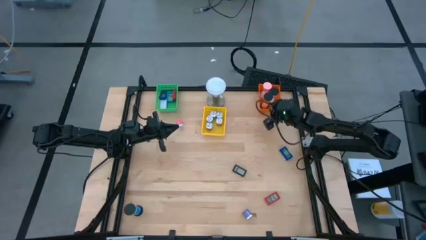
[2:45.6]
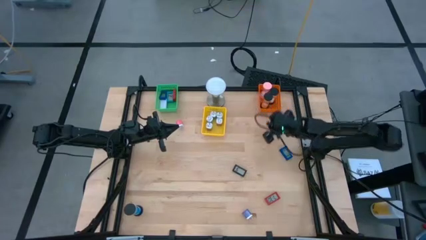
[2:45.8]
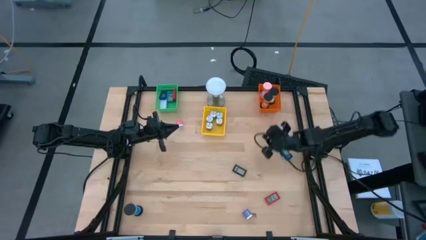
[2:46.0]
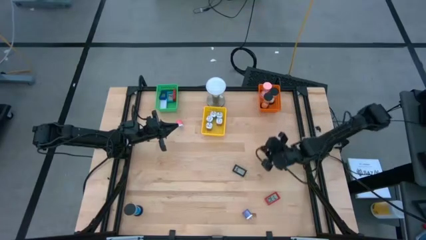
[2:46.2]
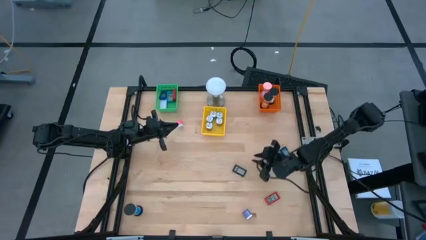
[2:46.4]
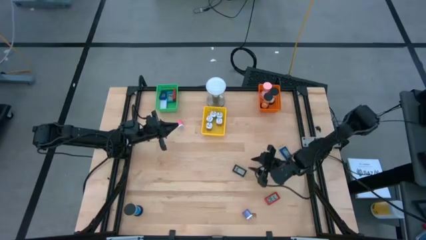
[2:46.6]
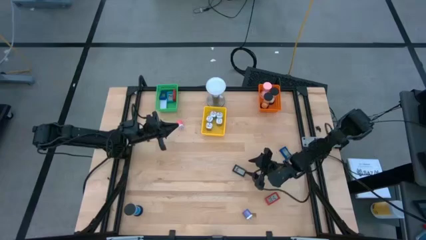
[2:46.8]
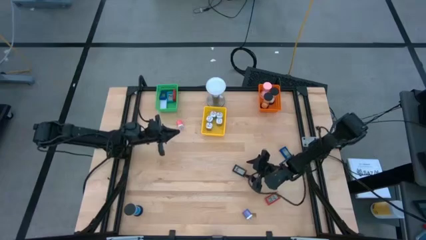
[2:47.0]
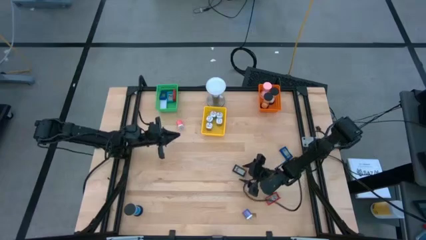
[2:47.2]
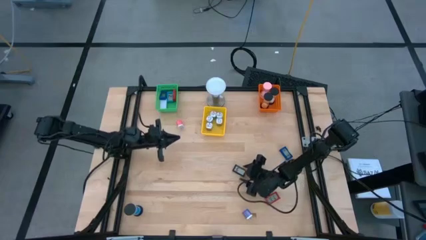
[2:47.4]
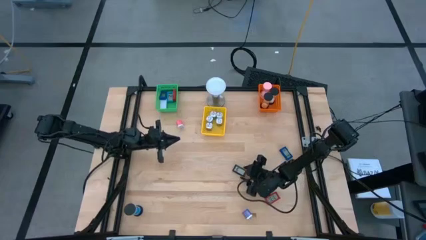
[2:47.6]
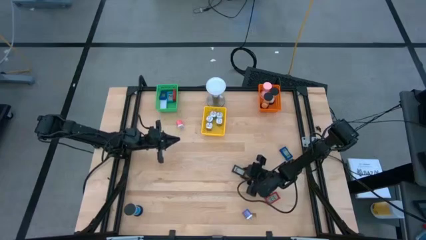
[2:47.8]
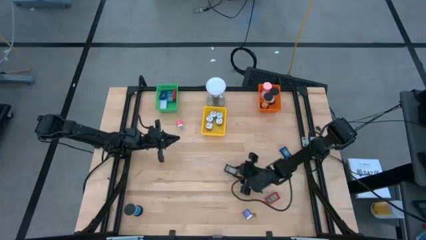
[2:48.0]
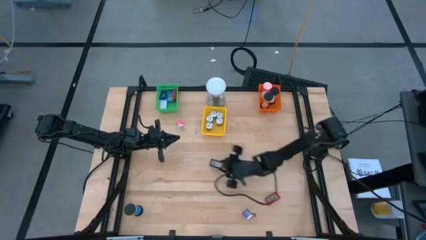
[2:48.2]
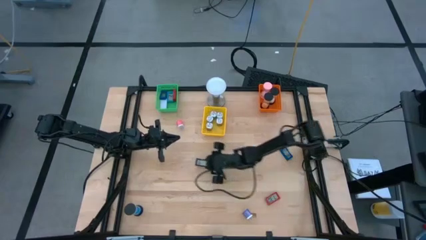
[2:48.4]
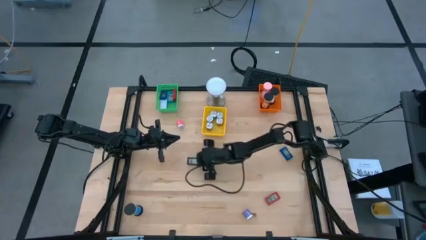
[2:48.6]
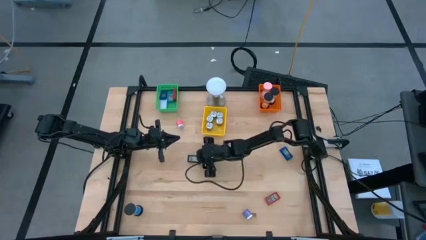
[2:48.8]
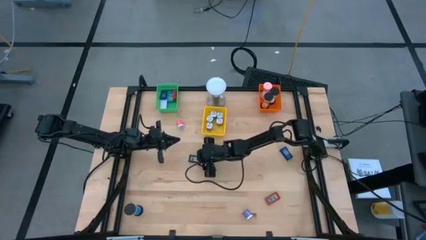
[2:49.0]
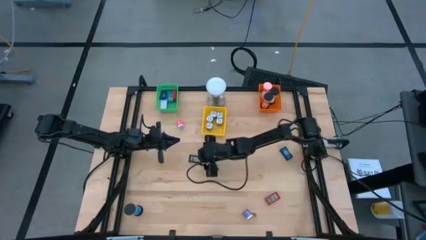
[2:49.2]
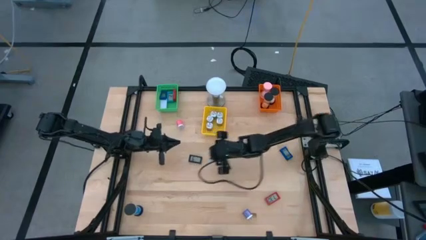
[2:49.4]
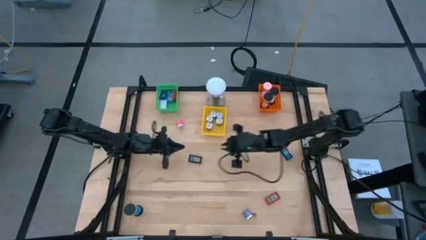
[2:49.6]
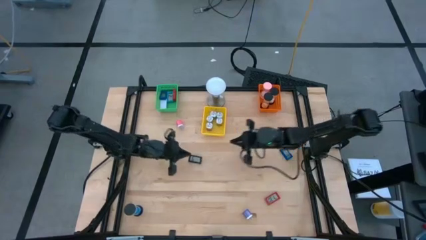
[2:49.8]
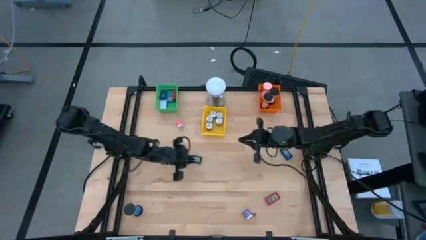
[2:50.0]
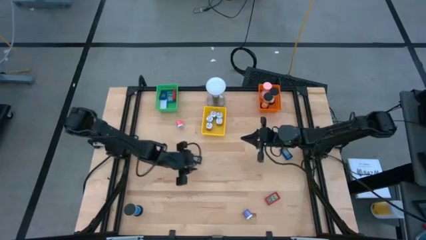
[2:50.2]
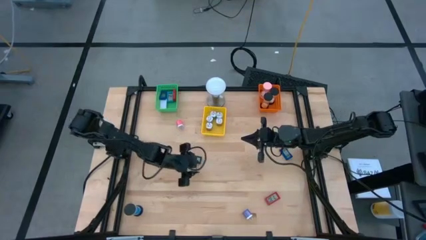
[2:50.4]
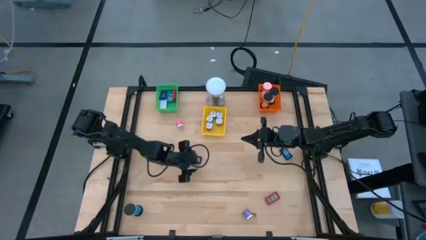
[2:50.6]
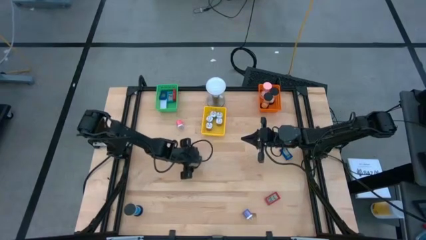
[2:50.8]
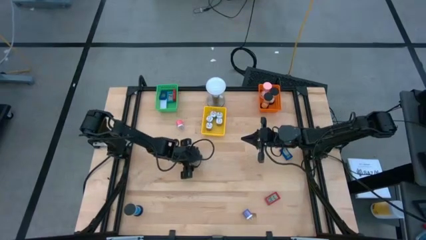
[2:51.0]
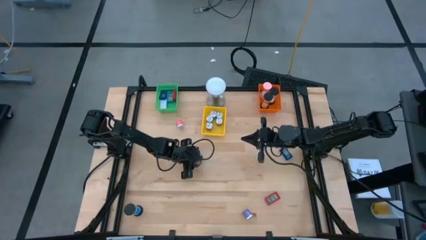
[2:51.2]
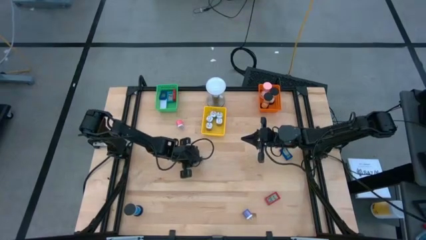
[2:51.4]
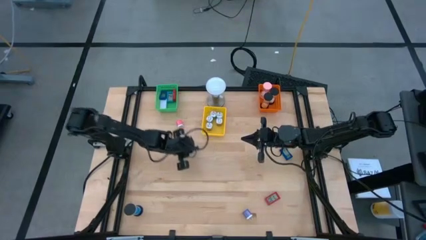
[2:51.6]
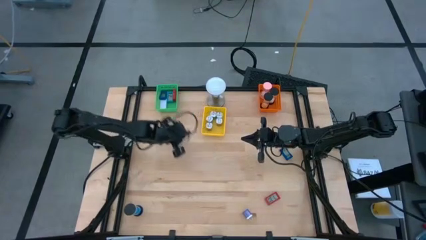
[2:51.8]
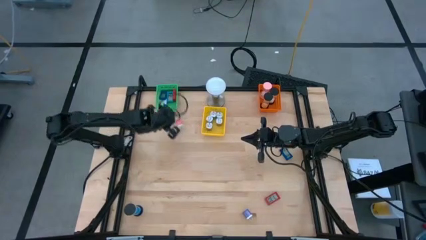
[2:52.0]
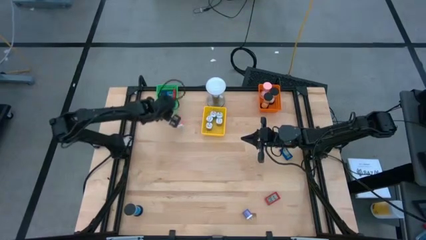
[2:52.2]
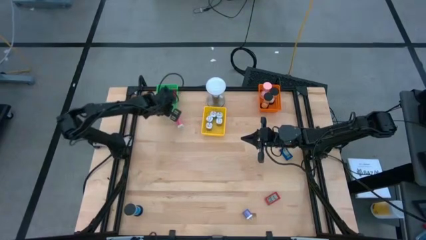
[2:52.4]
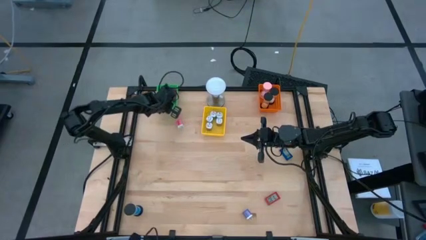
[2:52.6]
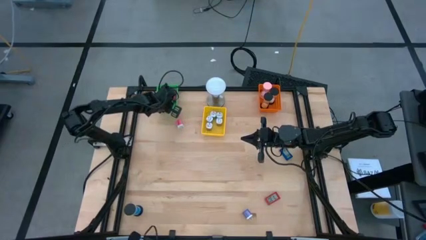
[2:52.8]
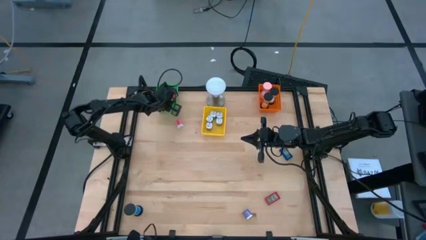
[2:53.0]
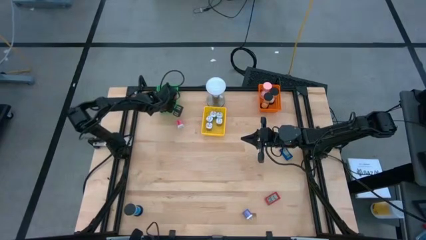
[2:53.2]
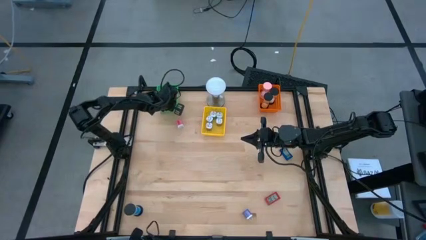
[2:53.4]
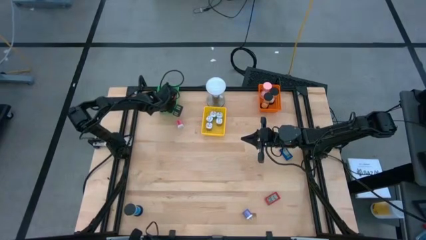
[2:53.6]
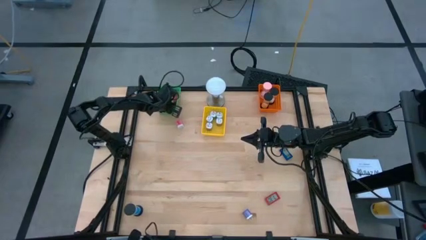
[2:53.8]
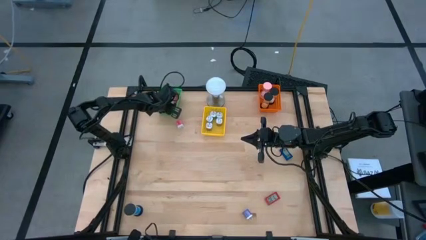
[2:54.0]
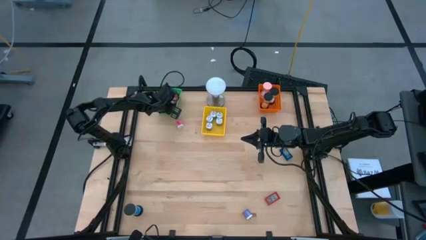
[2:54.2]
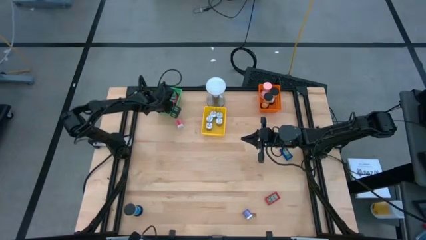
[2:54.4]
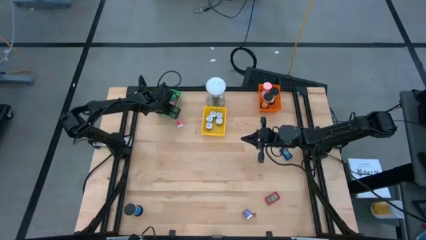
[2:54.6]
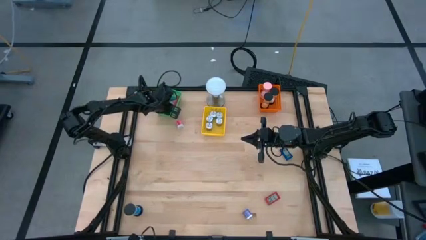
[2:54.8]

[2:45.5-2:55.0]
Task: Pick & Place Office items
Put the black digital clock into the green bin

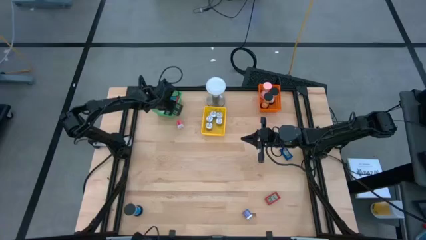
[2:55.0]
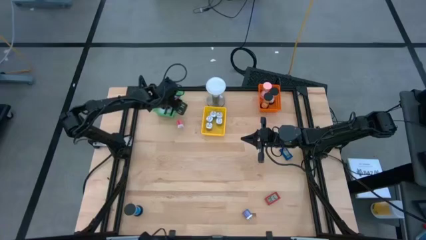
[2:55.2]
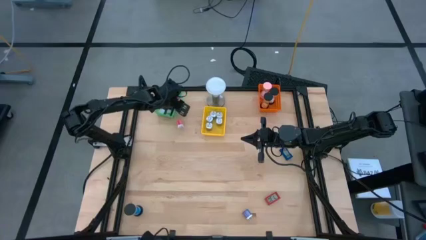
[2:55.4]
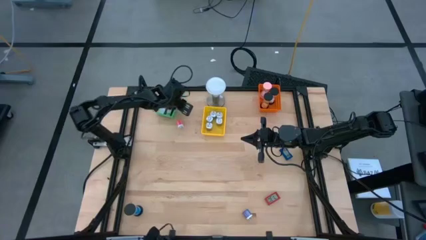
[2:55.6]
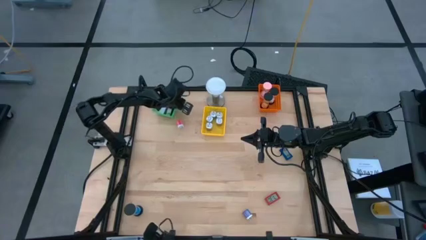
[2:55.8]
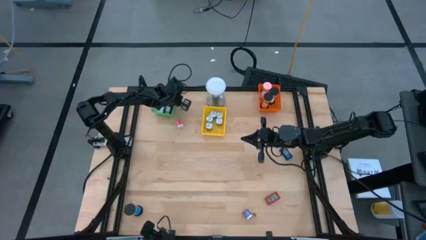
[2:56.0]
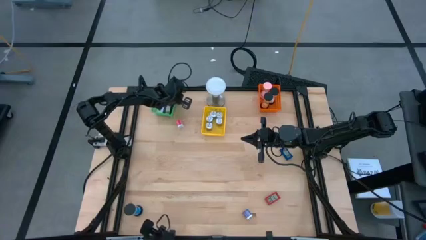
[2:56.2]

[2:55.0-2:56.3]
Adjust the green bin

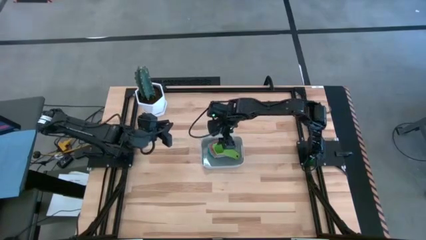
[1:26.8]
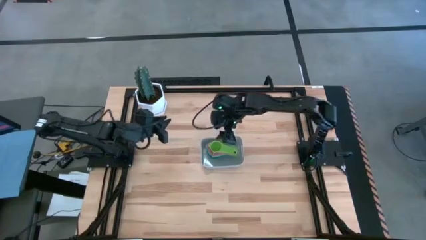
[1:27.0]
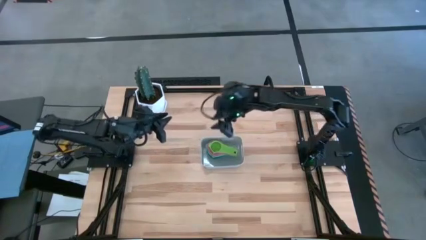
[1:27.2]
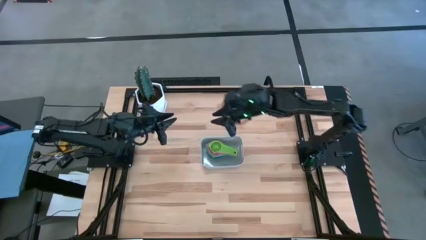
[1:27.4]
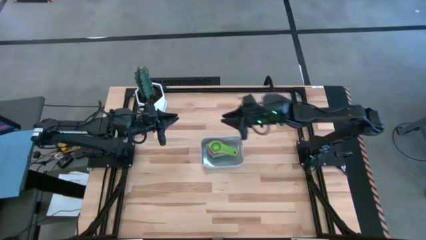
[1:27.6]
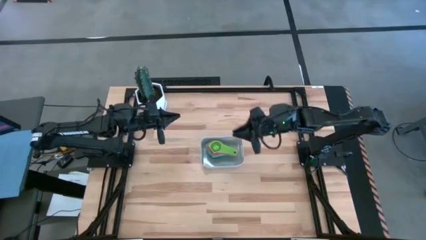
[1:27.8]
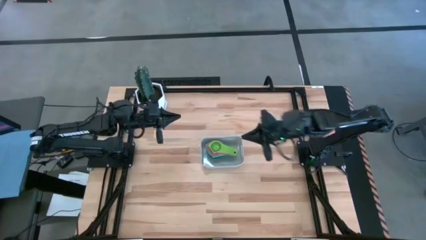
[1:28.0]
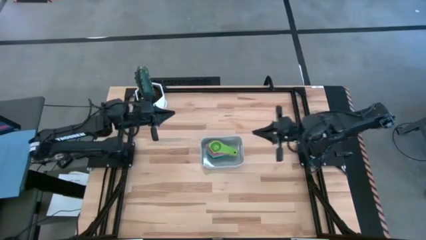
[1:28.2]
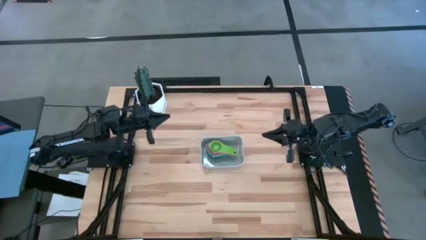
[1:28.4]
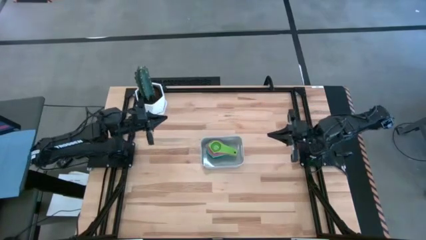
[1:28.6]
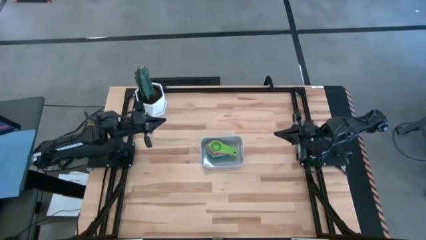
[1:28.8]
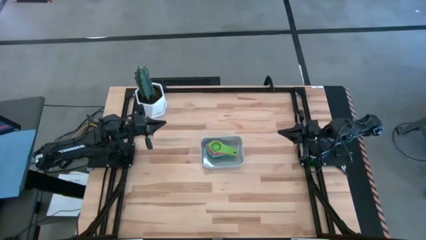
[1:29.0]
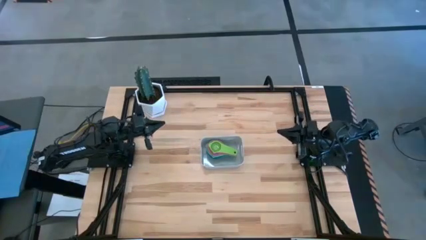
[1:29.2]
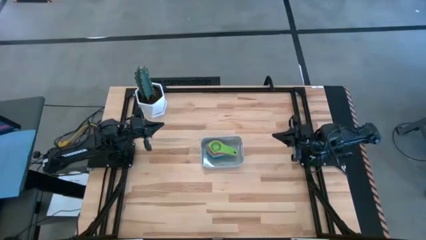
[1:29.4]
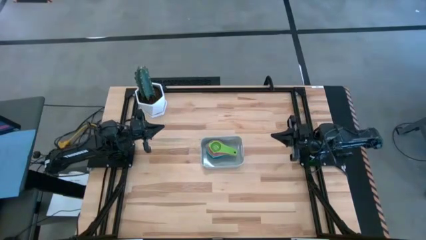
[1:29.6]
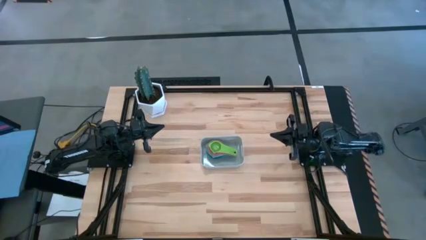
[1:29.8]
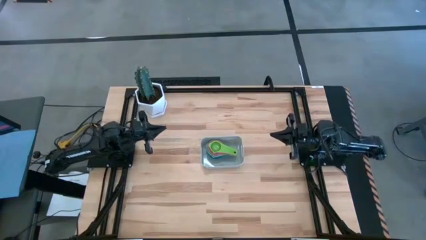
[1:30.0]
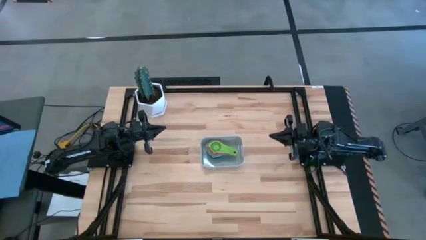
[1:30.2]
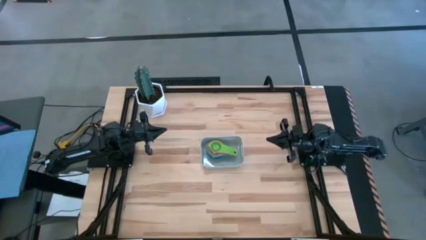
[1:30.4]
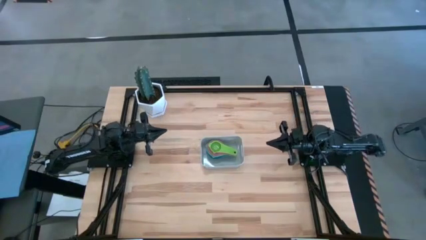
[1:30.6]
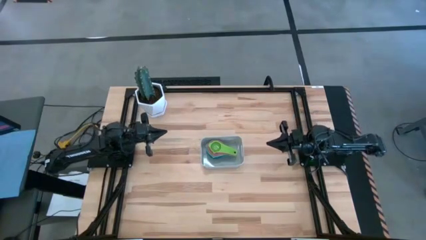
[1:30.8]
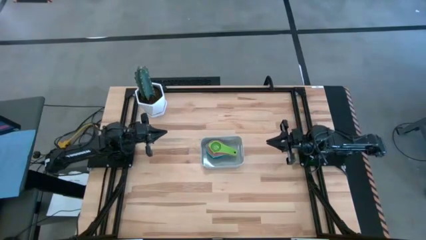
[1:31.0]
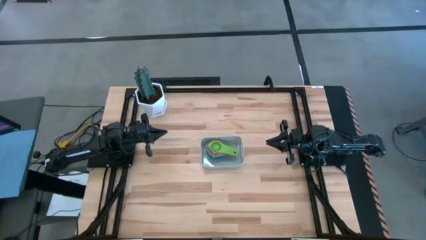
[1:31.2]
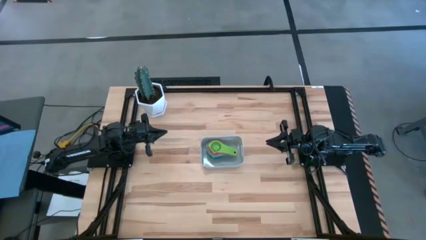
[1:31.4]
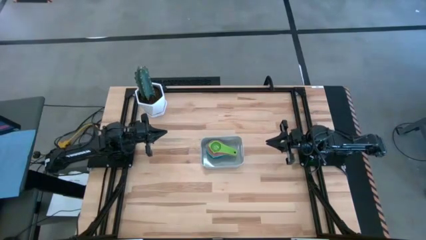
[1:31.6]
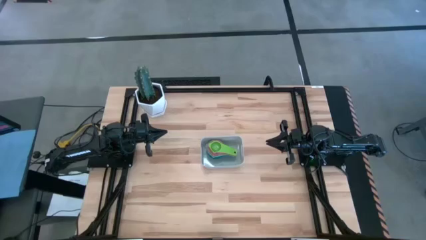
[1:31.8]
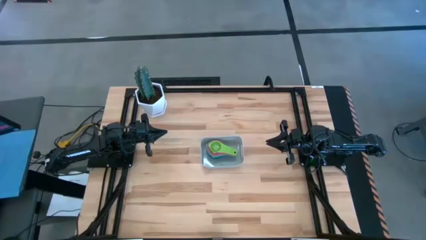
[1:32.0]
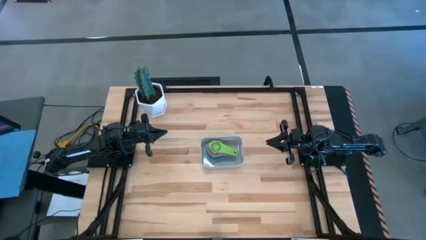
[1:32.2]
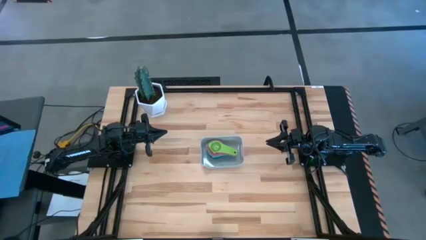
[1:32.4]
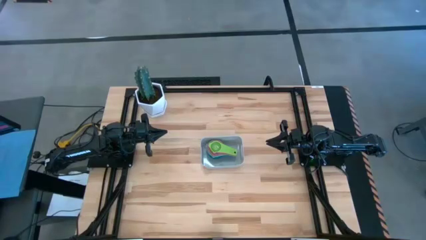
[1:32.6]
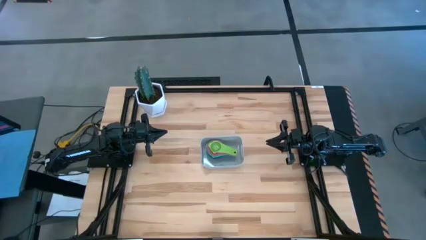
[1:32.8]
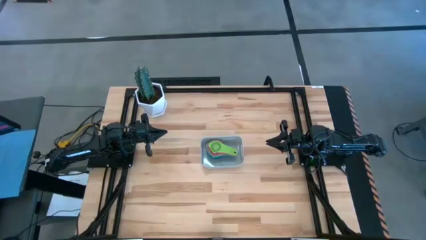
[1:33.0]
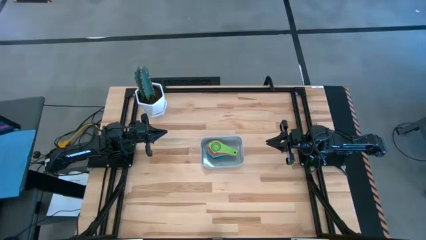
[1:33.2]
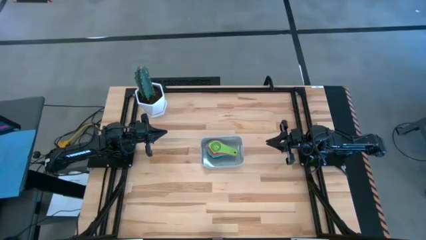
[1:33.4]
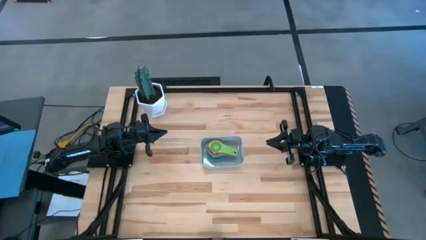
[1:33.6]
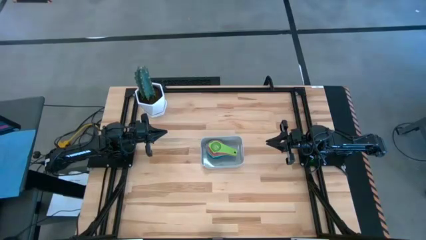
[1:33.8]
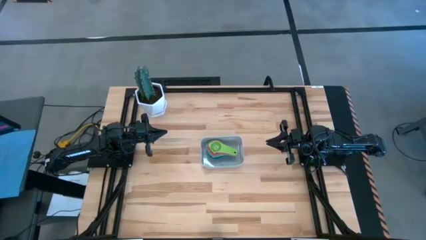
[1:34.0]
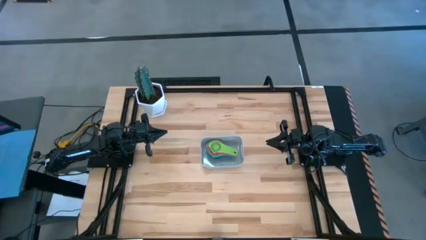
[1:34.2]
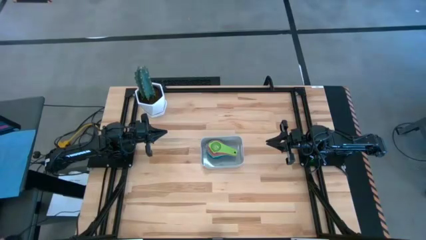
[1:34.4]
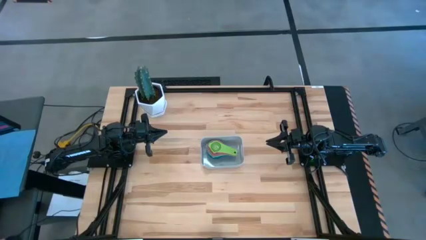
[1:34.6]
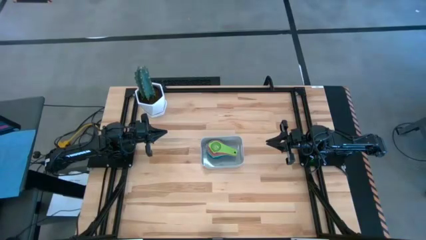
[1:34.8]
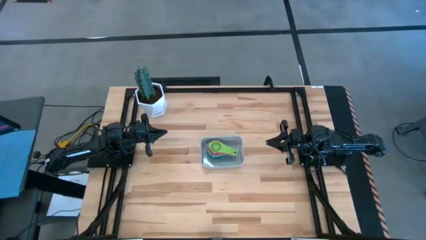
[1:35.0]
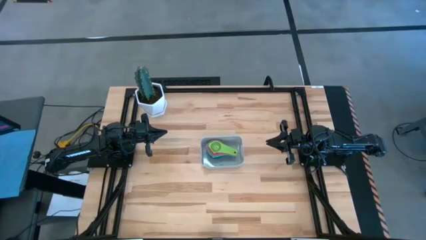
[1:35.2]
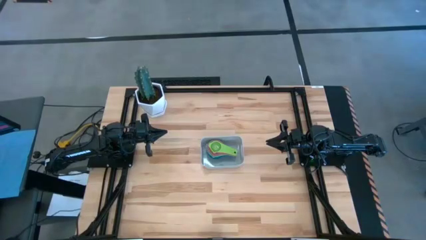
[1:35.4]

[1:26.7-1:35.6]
Task: Nest measuring cups in basket
Return to Home Position
